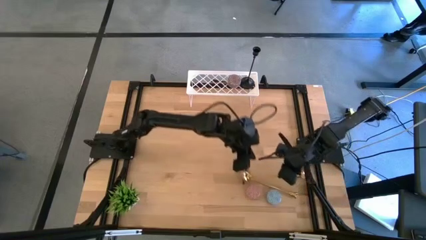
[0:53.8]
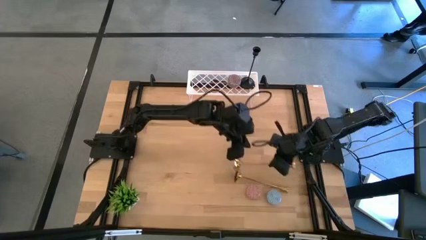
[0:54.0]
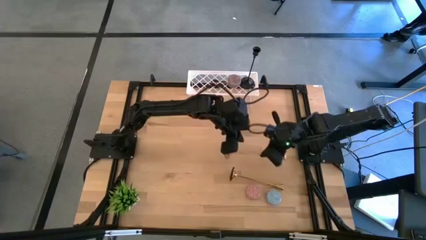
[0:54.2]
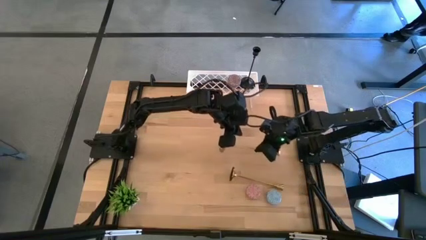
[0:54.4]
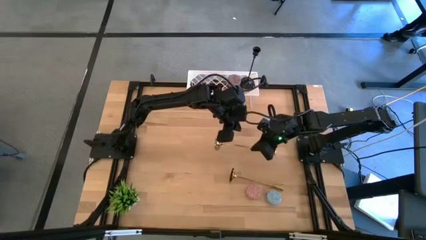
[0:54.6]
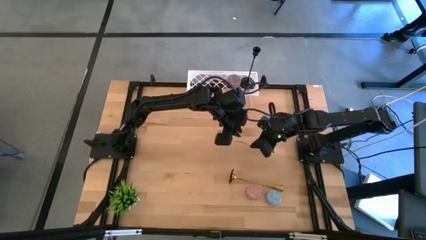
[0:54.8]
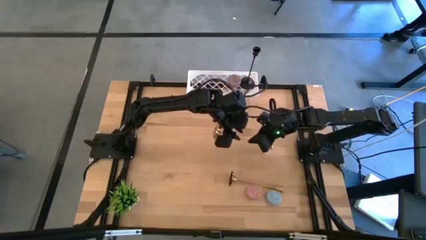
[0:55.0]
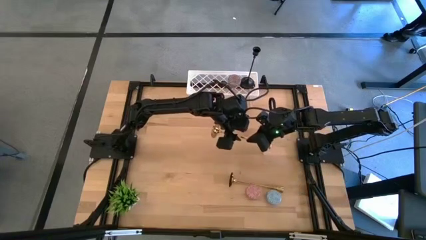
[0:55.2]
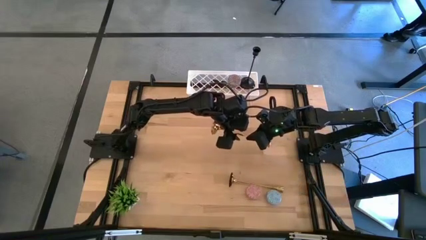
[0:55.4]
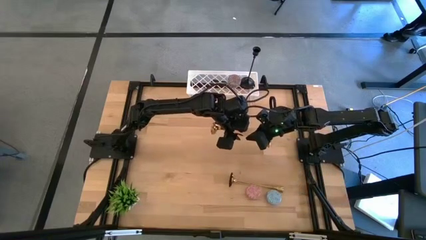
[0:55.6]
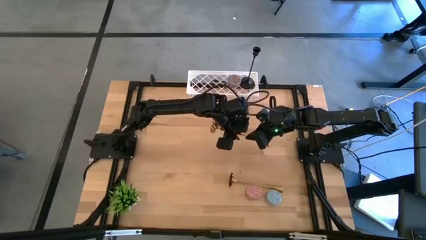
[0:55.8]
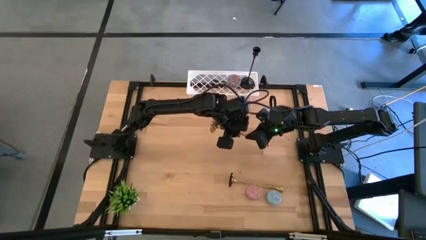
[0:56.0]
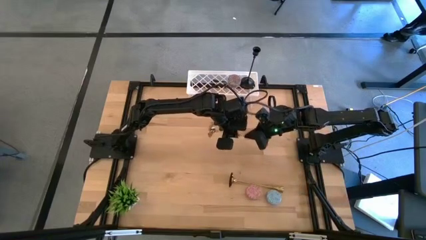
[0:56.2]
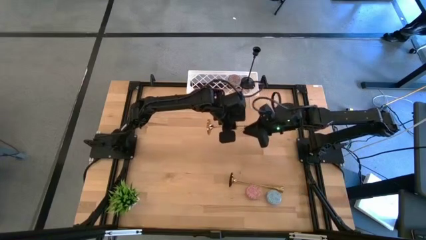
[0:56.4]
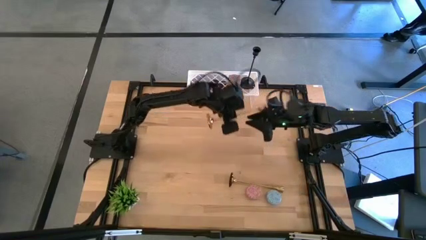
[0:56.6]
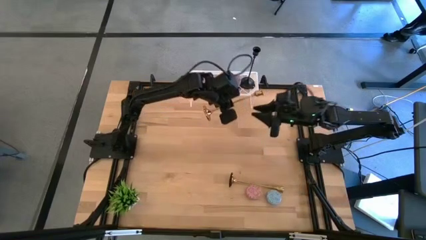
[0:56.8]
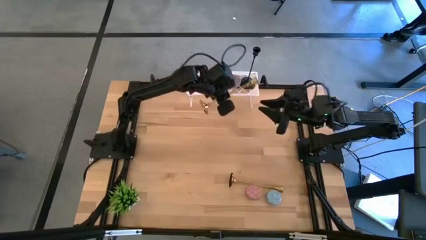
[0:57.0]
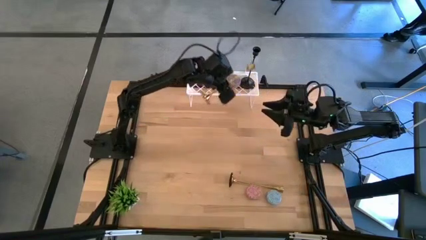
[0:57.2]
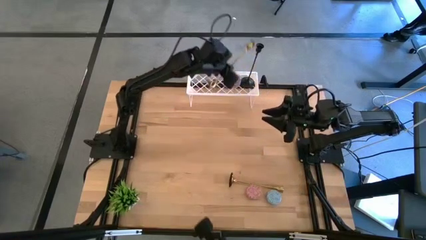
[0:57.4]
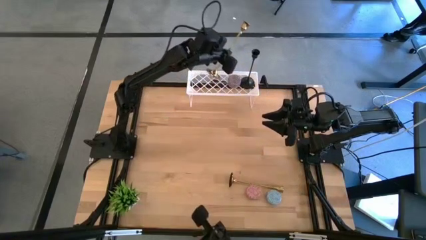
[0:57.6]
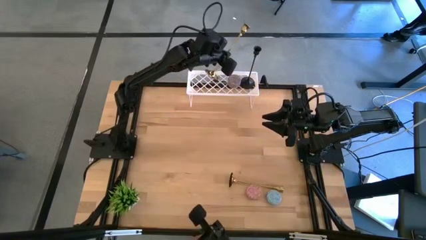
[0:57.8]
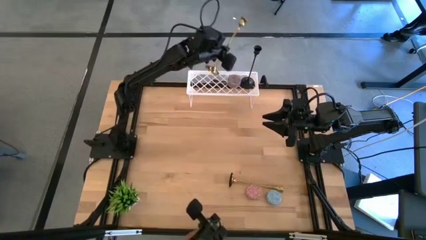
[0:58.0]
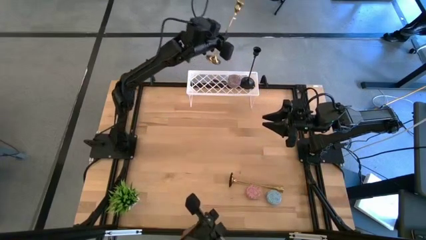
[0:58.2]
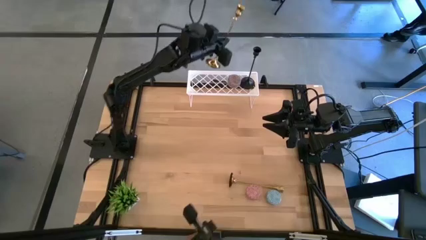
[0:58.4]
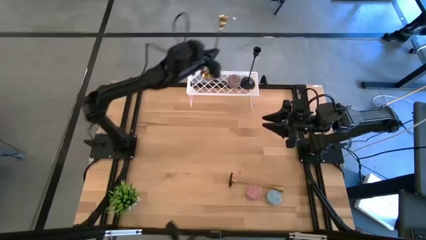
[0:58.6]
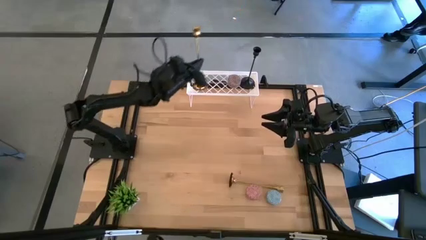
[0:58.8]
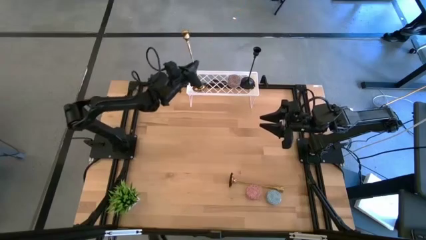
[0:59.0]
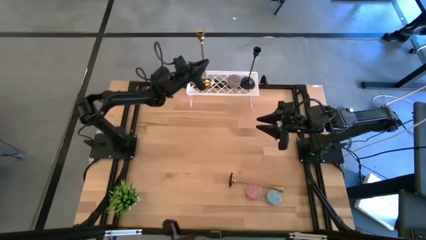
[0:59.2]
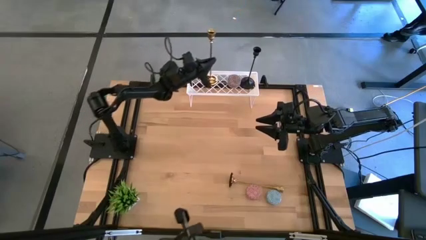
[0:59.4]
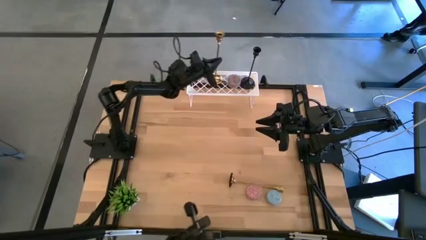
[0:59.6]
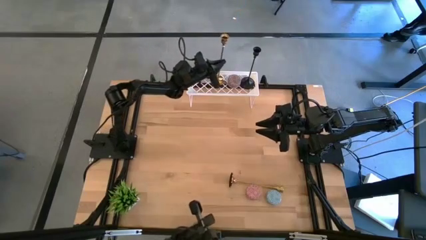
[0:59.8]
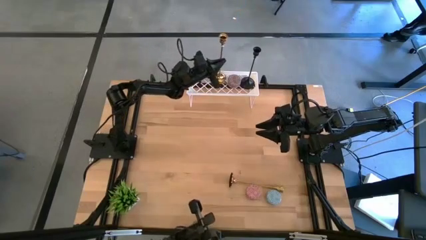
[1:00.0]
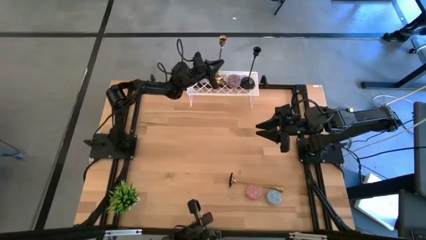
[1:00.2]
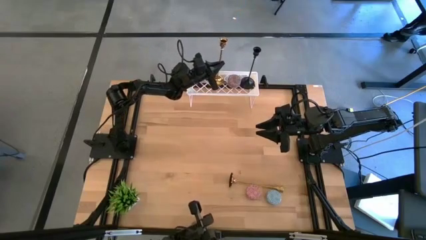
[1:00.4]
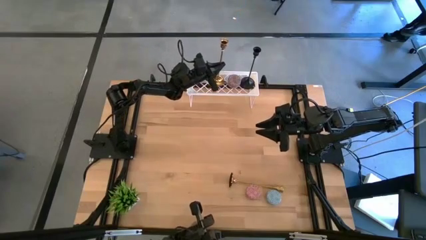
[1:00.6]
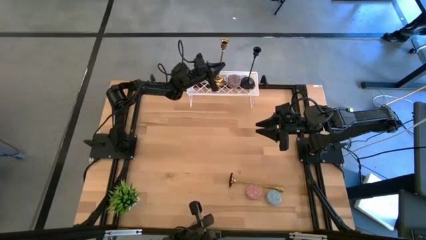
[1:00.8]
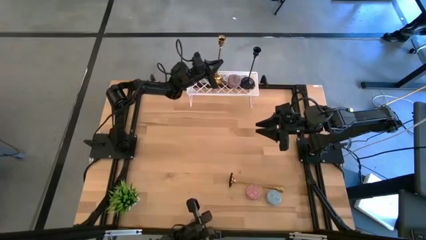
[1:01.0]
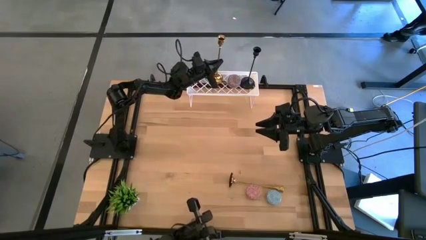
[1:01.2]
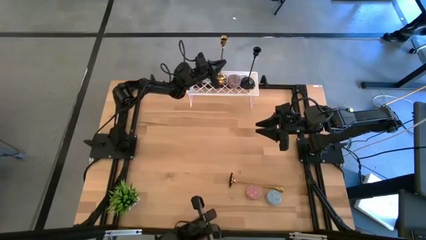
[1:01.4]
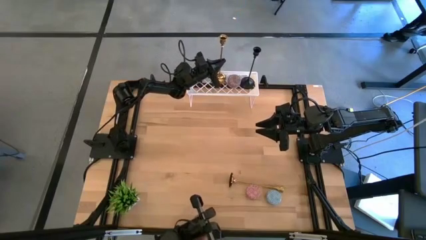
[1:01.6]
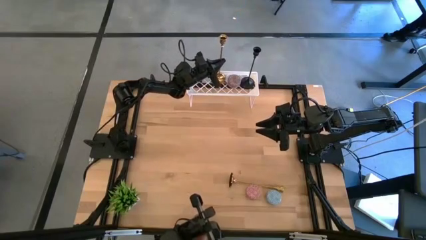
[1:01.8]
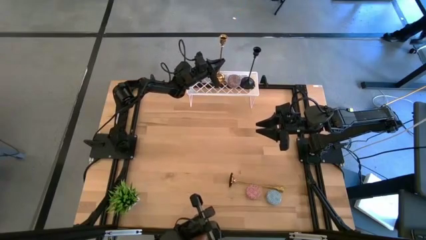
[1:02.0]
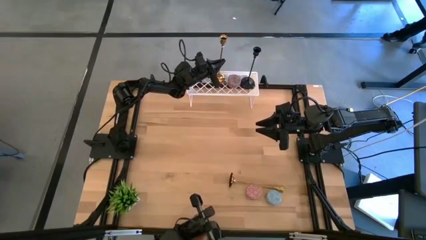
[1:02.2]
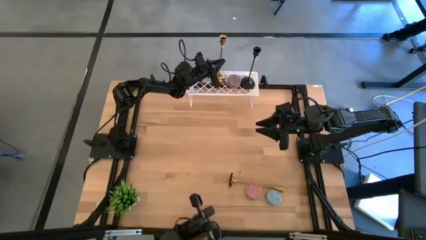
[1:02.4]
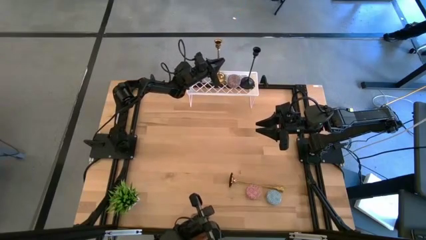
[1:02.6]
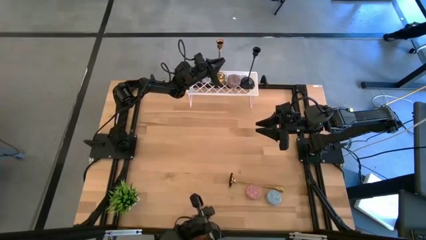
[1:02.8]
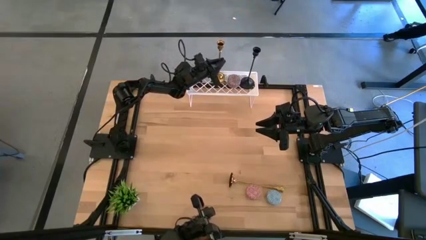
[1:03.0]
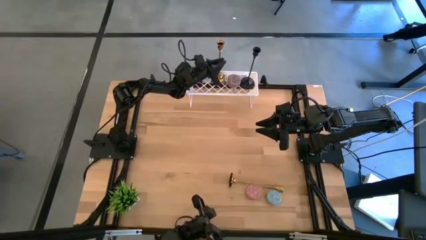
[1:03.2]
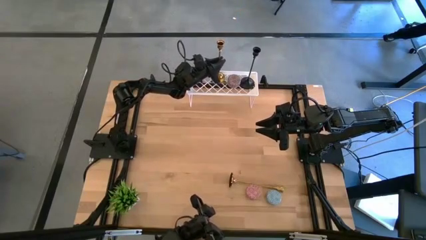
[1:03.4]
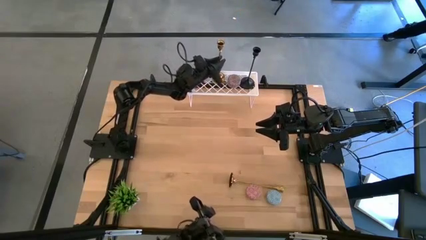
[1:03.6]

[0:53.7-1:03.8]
Task: Pick & Place candle stick holders
Put the right golden candle holder on the shelf
